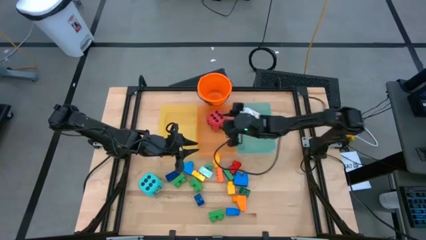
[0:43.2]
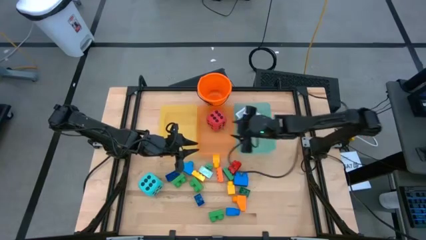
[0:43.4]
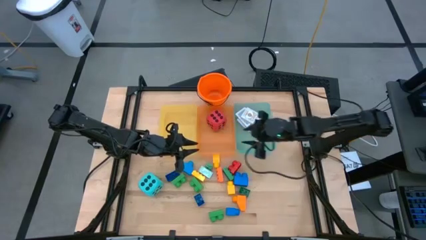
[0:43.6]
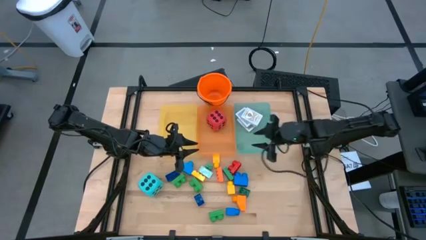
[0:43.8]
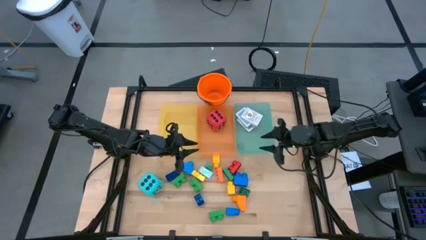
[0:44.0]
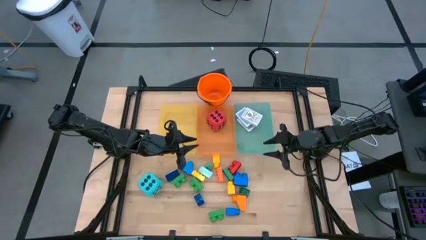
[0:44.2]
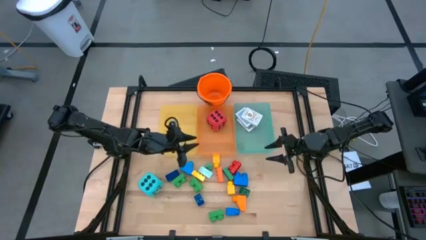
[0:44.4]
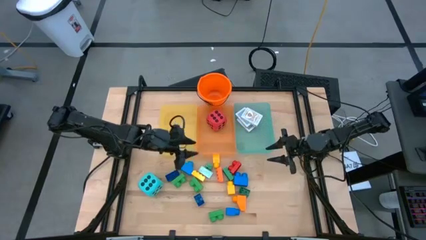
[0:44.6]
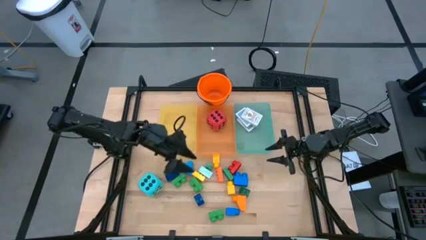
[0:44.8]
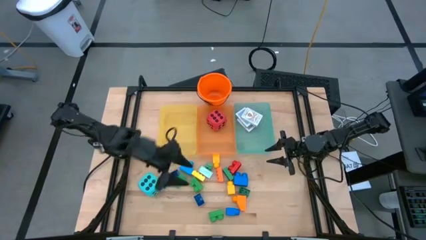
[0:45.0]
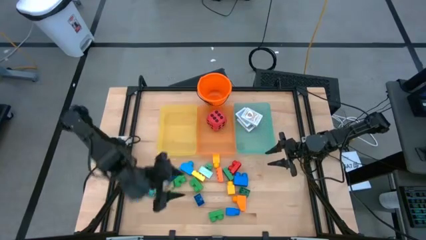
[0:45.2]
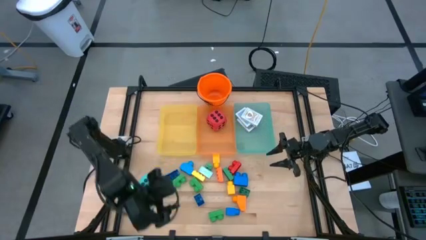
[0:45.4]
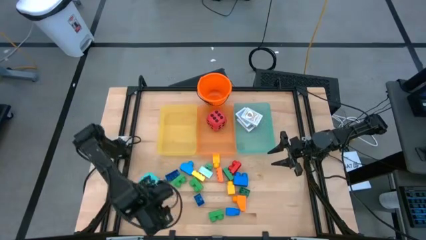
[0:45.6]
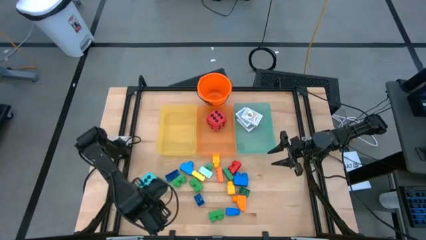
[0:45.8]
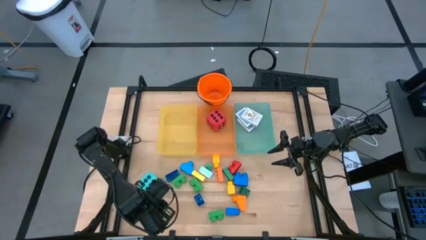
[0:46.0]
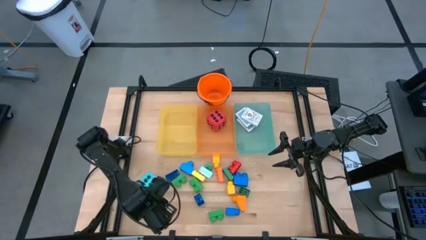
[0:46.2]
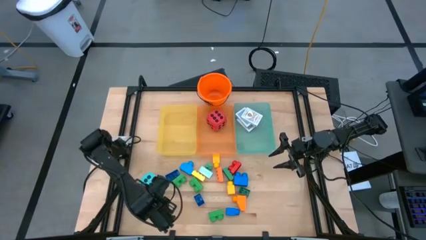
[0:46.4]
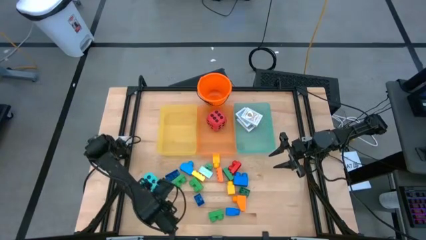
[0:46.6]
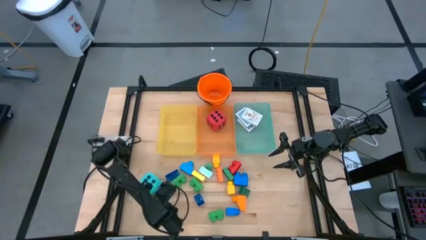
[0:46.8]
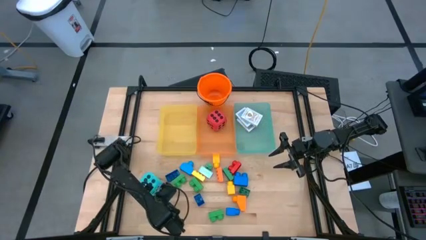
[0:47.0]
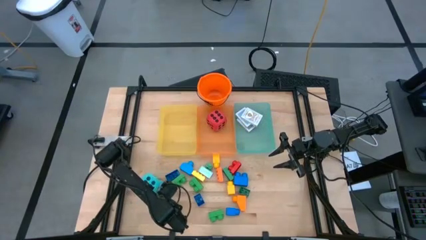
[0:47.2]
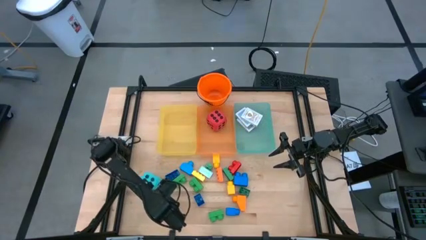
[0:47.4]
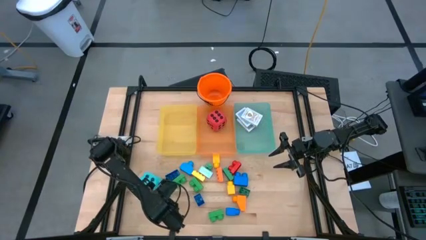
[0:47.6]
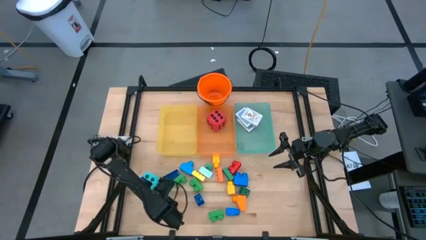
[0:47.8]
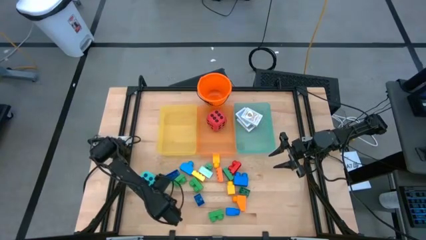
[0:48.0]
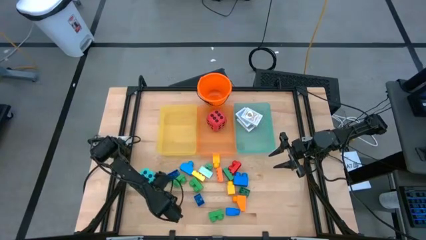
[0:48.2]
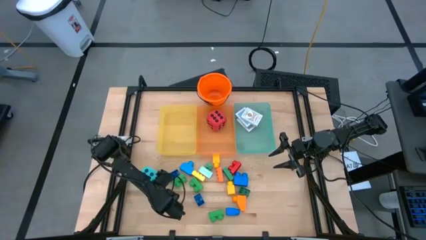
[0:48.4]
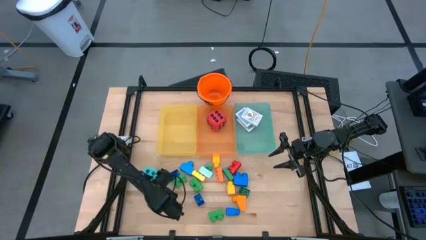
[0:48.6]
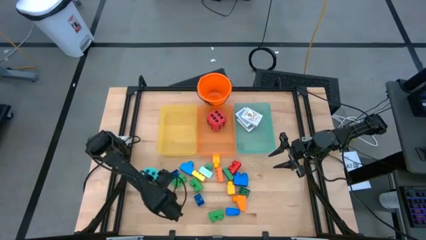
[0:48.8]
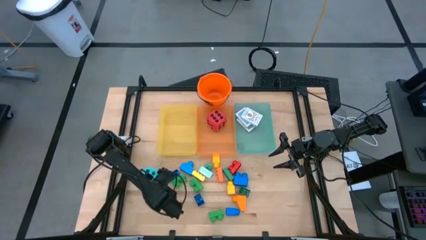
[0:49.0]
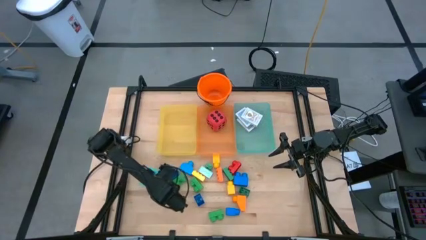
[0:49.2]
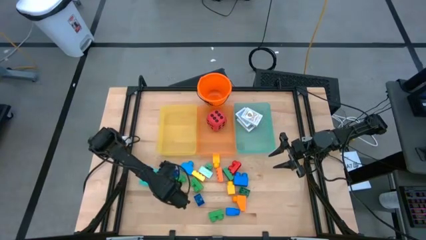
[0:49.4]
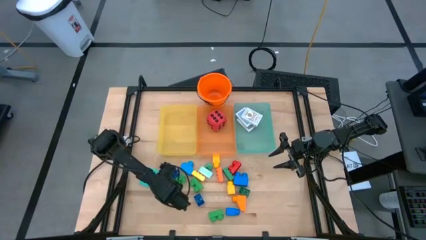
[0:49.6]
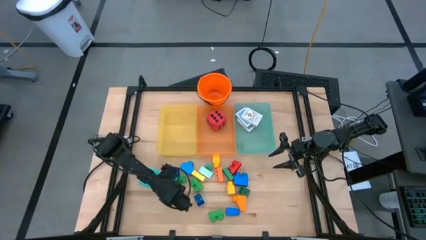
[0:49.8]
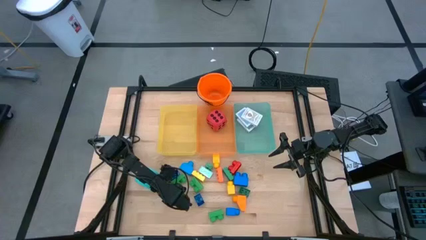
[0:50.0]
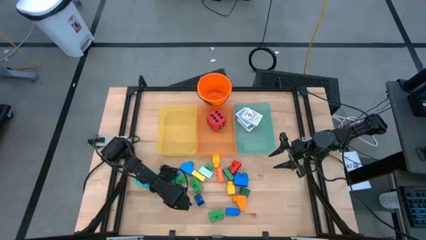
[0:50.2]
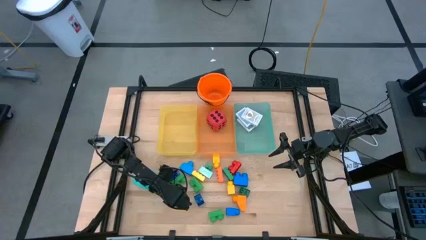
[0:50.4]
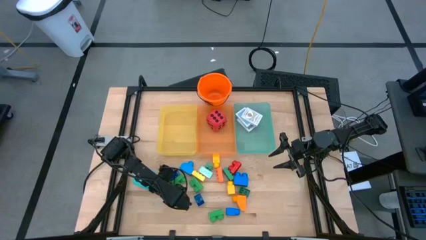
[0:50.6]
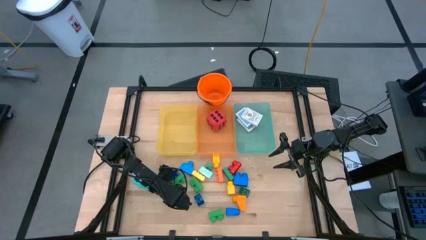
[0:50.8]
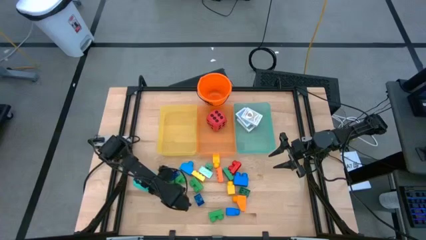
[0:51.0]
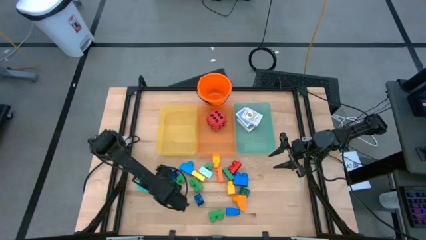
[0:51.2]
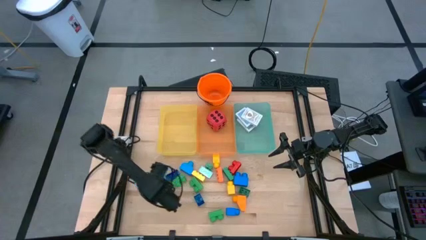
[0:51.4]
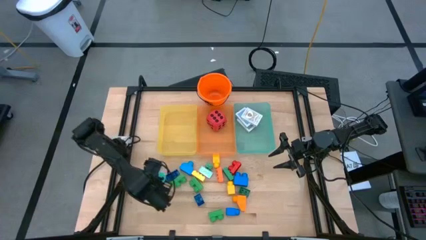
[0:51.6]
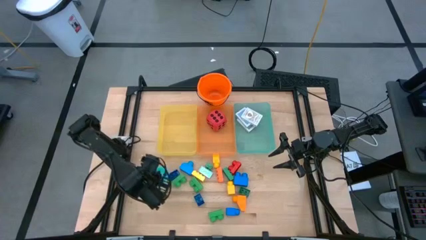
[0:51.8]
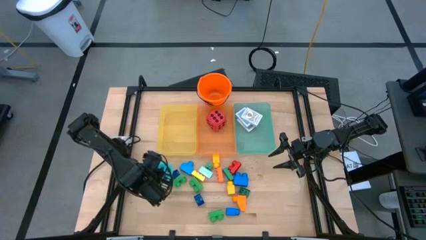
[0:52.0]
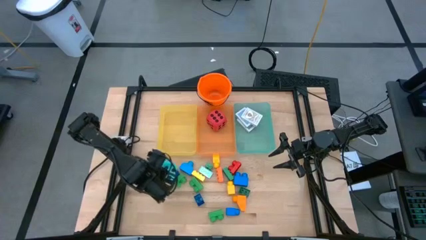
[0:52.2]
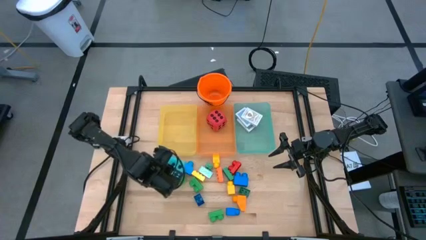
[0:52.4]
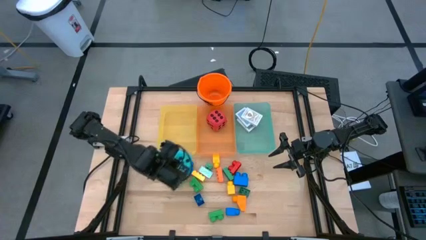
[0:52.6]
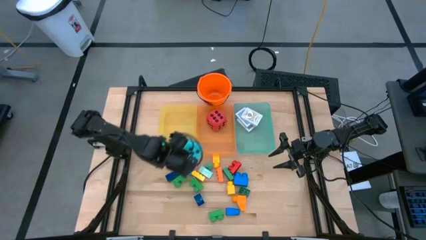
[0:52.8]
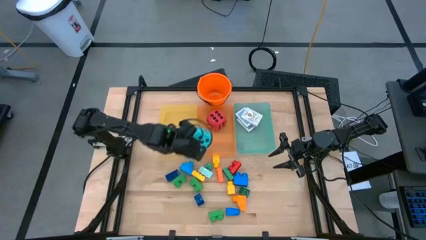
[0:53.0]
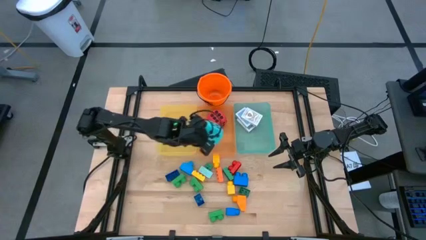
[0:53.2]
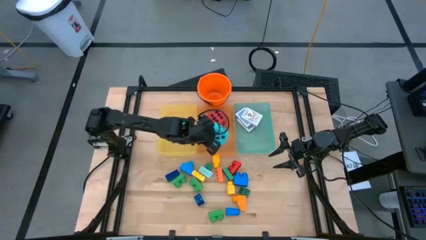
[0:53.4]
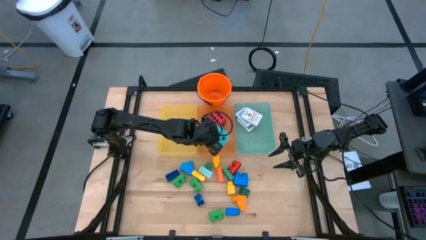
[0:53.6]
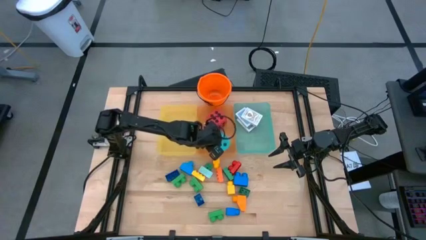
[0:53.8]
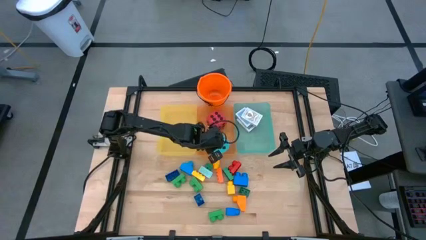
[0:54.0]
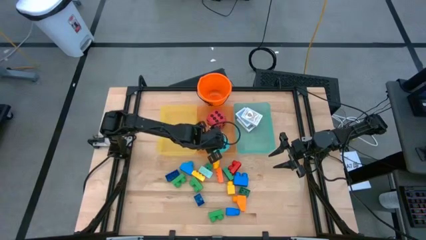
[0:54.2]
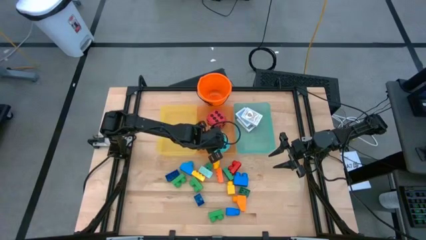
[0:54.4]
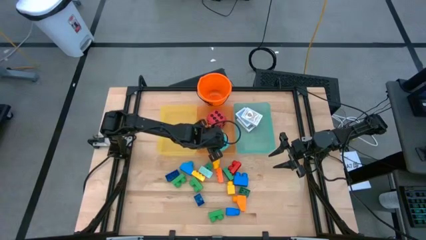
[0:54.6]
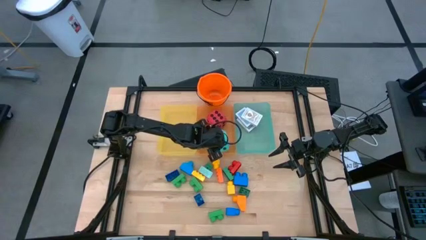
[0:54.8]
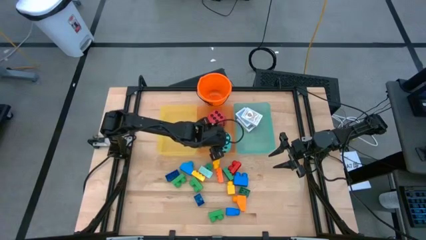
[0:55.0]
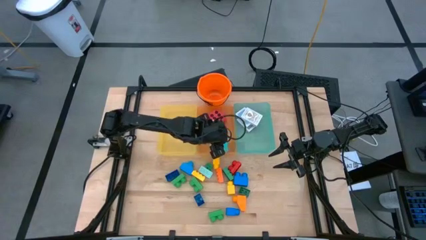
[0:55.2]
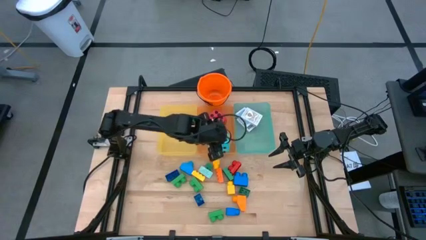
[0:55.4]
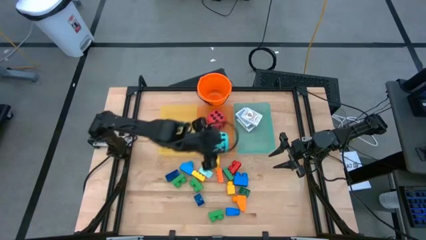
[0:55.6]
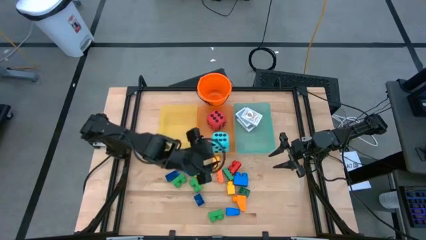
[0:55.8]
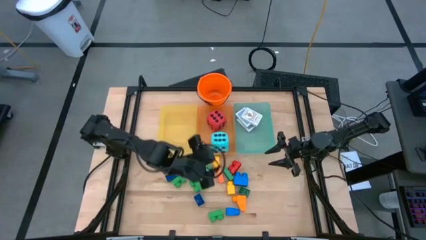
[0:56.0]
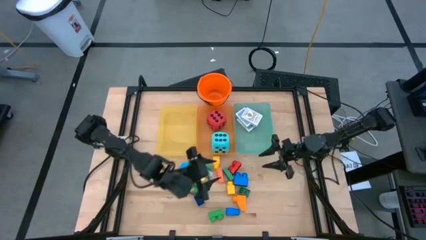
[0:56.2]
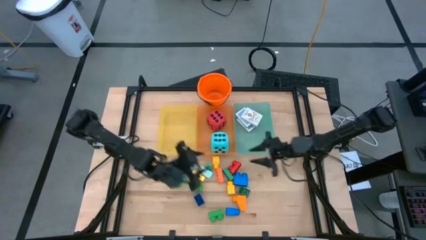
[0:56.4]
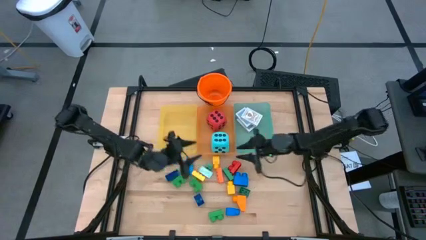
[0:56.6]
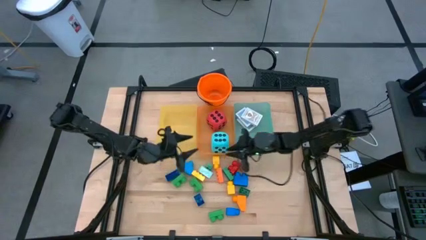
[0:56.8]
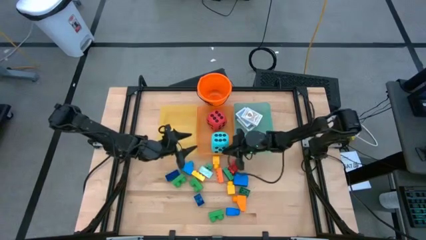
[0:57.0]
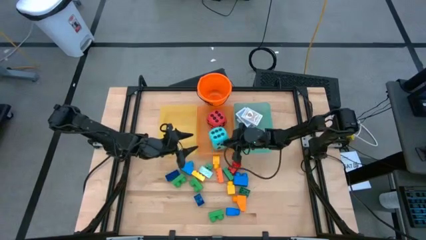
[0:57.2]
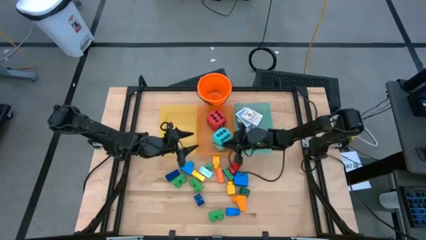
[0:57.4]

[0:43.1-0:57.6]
Task: Pick & Place Toys
Put the large blue dice into the orange bin

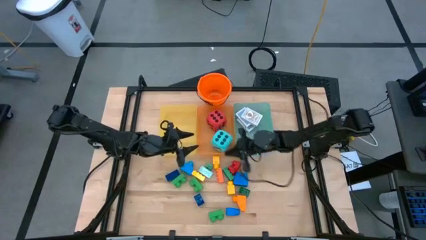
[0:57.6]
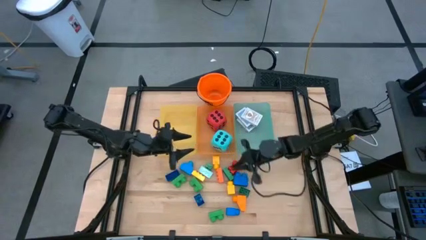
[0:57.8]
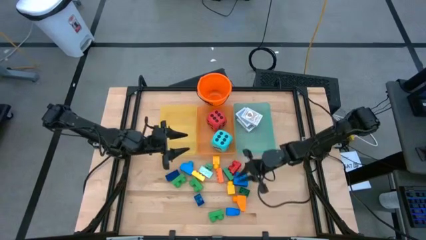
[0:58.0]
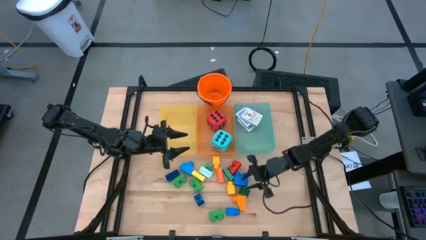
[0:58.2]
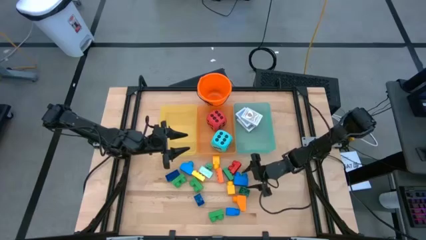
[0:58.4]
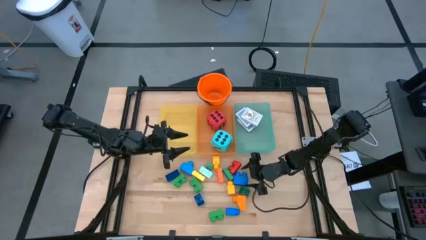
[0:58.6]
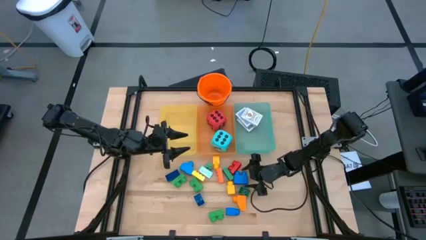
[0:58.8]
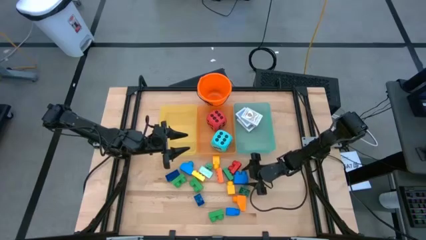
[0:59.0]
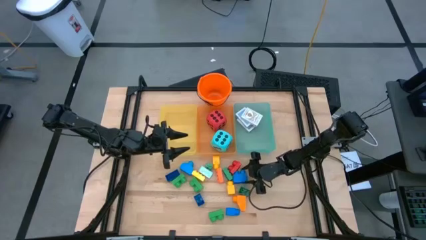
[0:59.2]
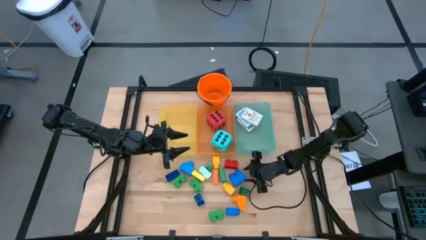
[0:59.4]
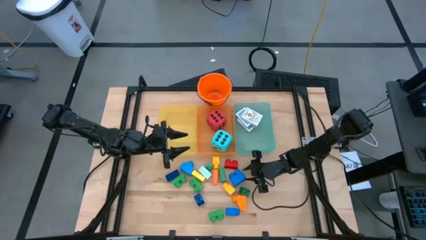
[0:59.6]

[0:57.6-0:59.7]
Put the blue game piece into the yellow bin
